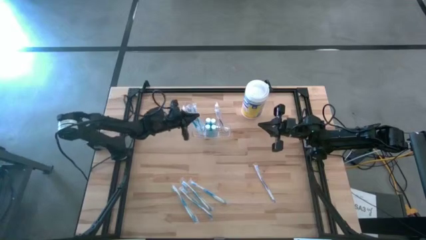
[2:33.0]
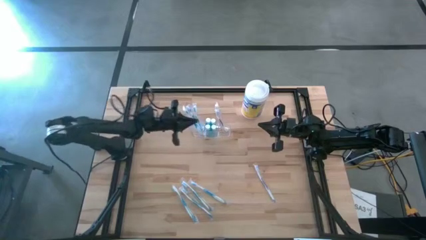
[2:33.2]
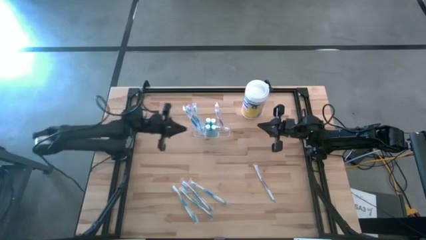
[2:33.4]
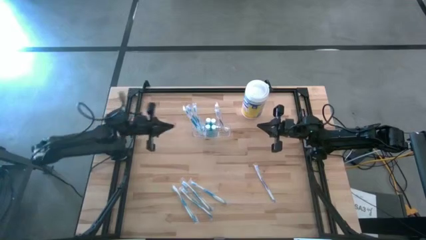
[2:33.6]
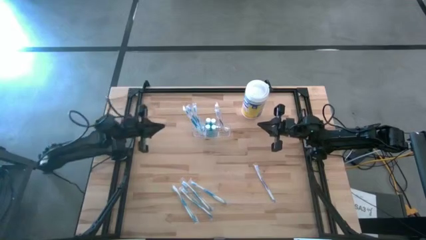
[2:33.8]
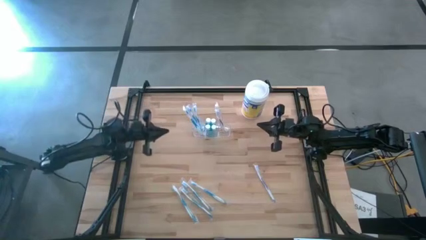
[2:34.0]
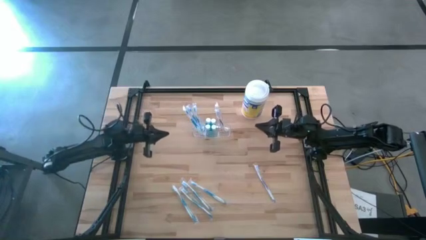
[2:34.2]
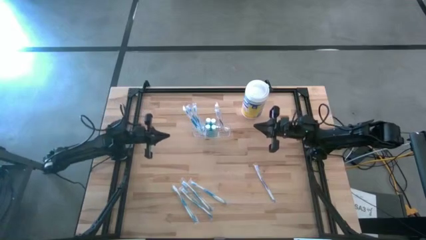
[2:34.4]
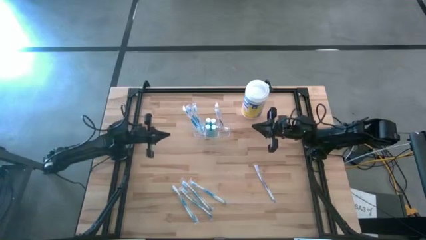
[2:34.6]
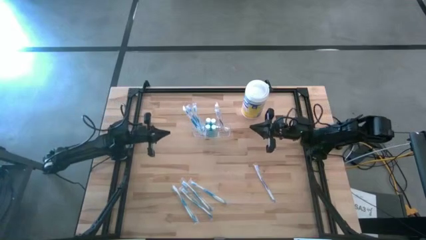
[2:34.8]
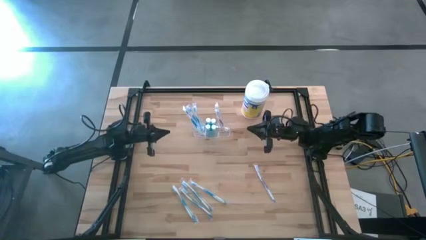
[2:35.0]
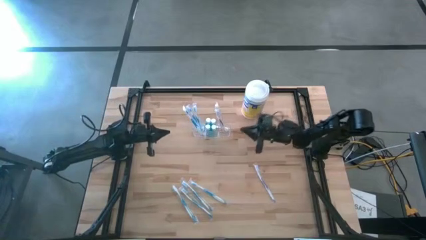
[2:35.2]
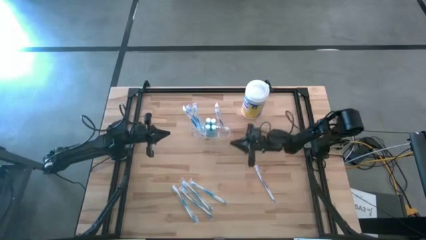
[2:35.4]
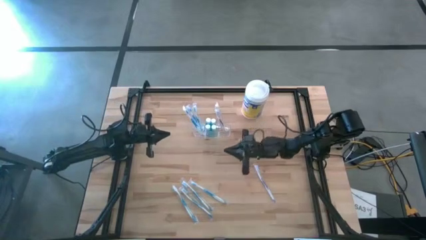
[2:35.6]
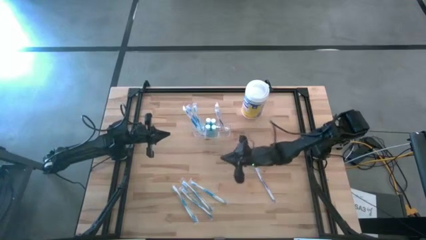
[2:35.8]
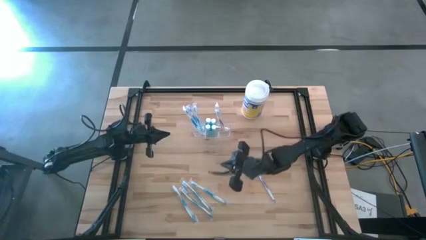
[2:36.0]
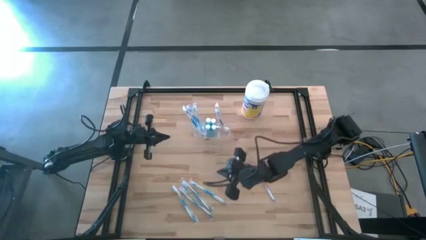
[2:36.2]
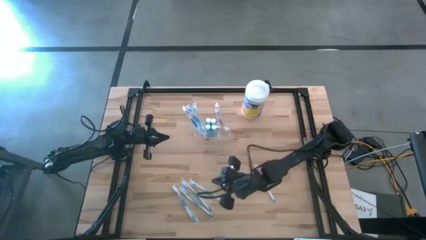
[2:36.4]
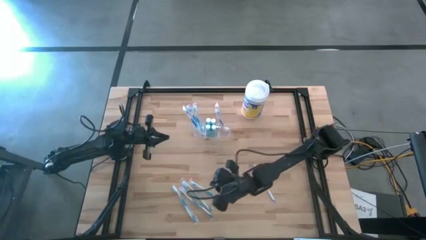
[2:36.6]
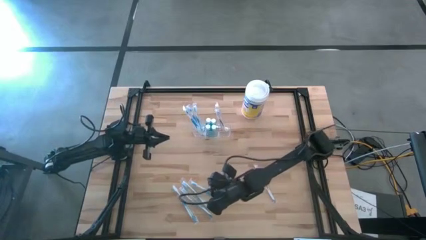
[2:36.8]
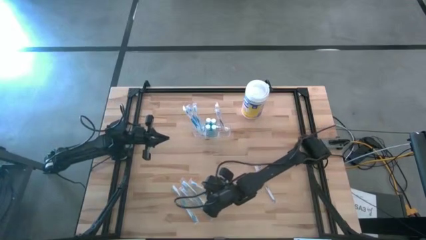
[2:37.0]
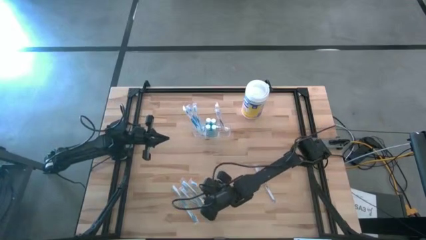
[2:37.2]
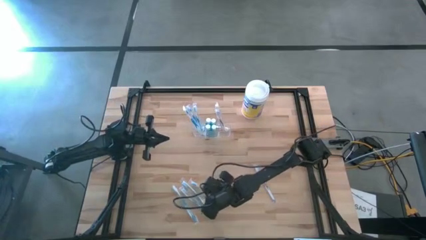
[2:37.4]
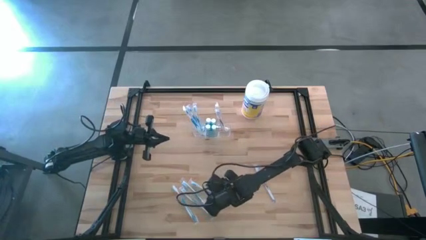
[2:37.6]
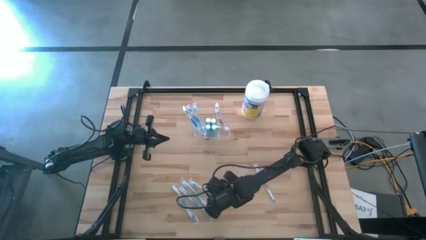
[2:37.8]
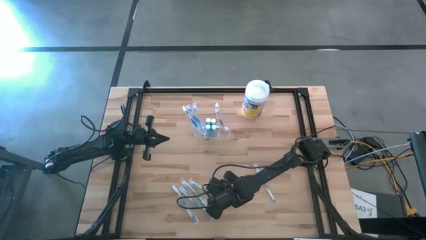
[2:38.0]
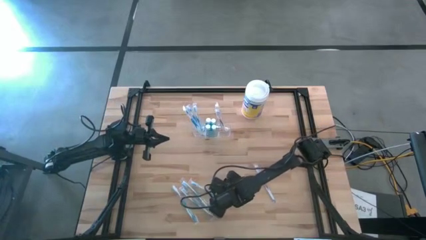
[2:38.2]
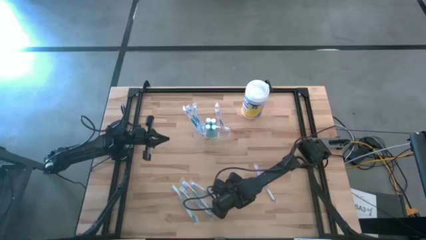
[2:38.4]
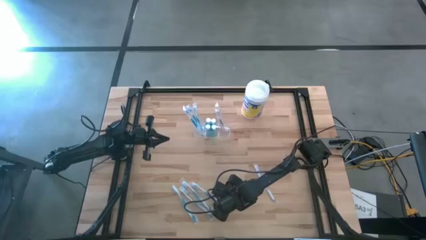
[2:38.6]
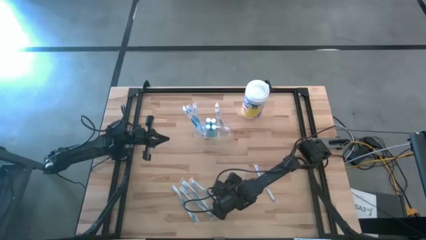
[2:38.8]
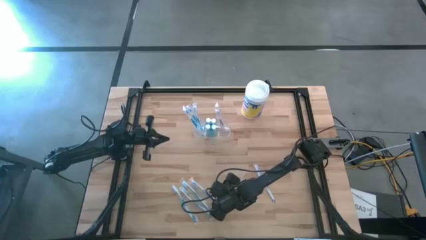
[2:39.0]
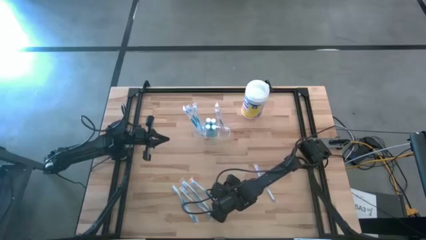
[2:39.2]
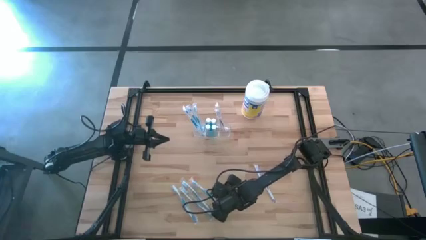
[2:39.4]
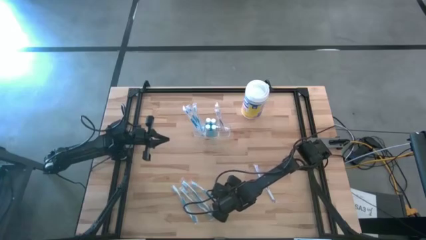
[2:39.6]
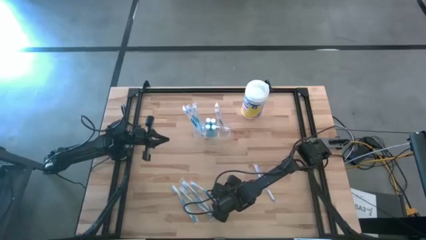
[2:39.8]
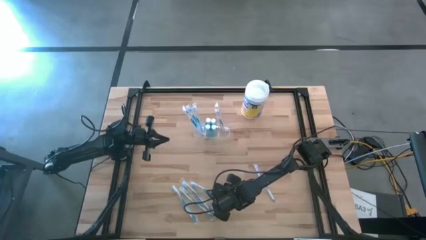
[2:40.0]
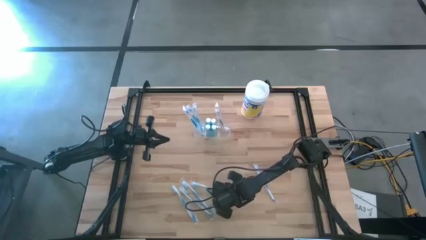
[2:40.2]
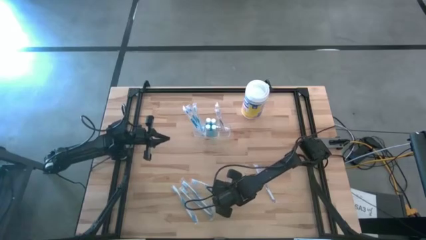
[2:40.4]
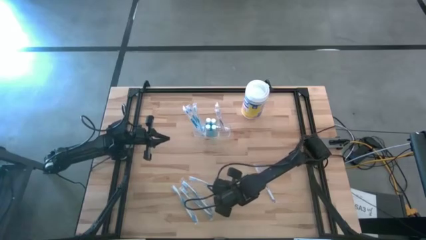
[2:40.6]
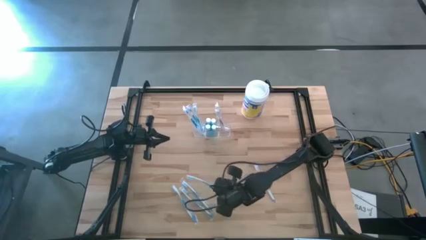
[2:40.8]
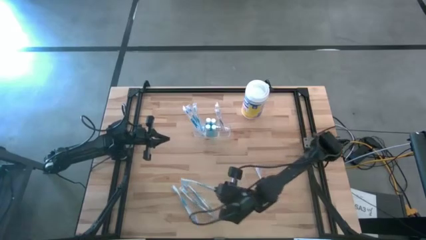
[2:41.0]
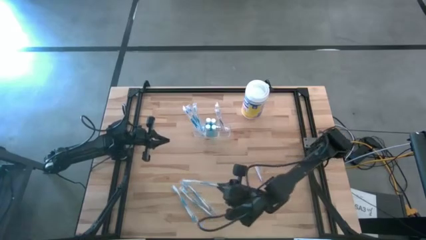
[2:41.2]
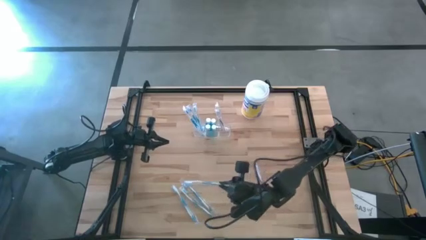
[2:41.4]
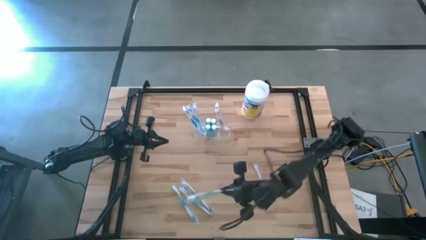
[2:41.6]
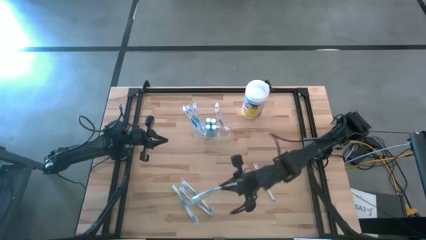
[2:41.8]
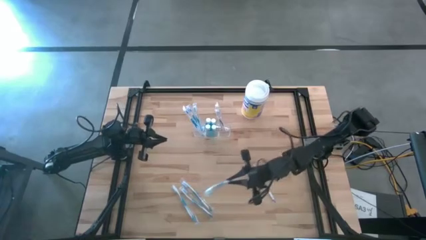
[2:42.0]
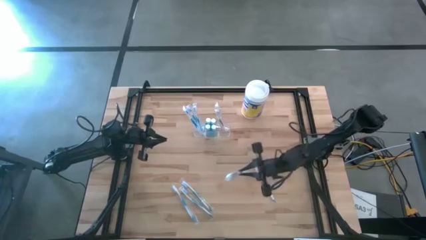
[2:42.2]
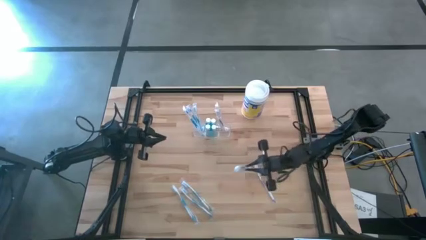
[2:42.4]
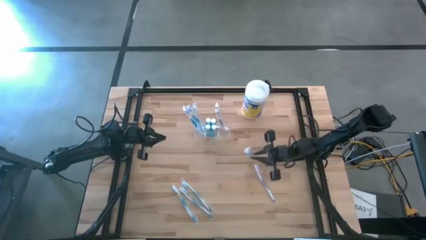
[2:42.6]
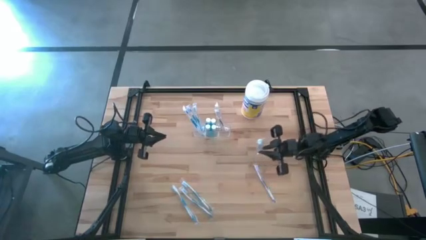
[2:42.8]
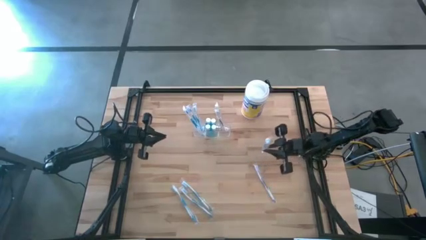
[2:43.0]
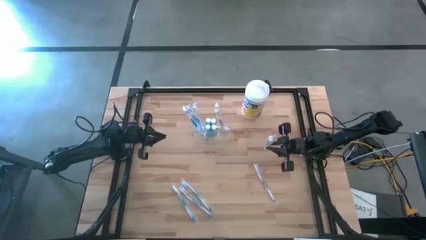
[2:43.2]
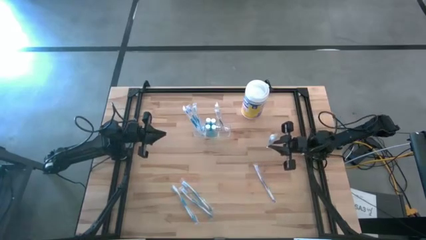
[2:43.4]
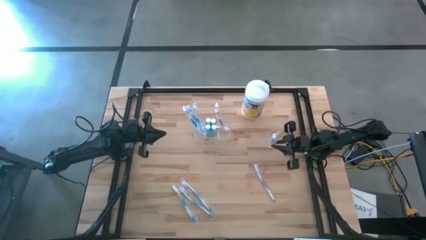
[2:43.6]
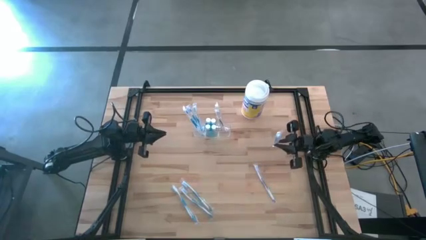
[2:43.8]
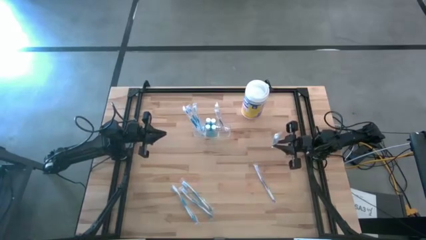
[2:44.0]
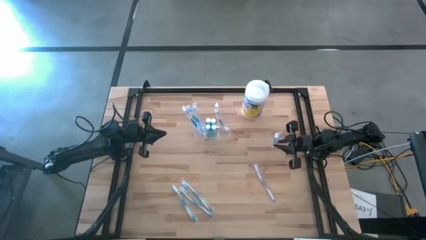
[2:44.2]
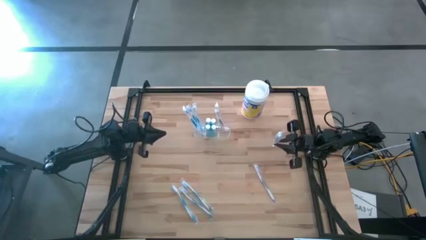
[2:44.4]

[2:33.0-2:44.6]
Task: Pick & Place toothbrushing station
Put the blue toothbrush into the transparent organizer
